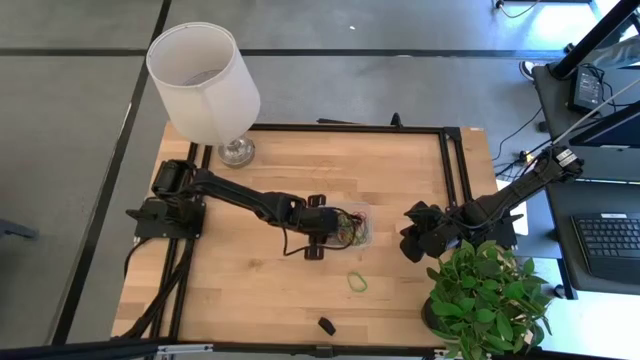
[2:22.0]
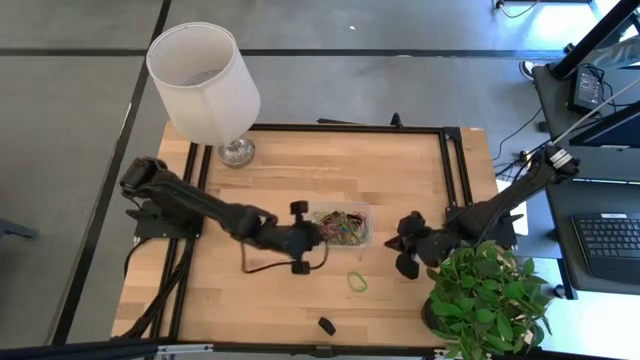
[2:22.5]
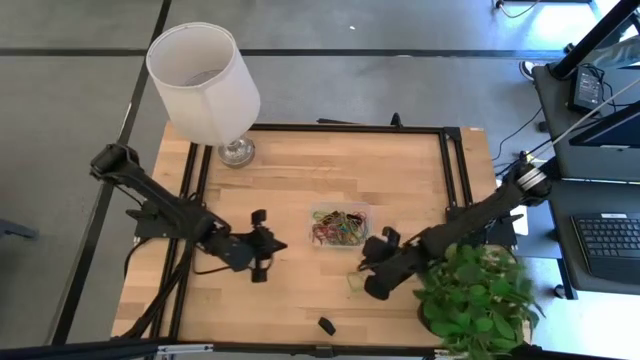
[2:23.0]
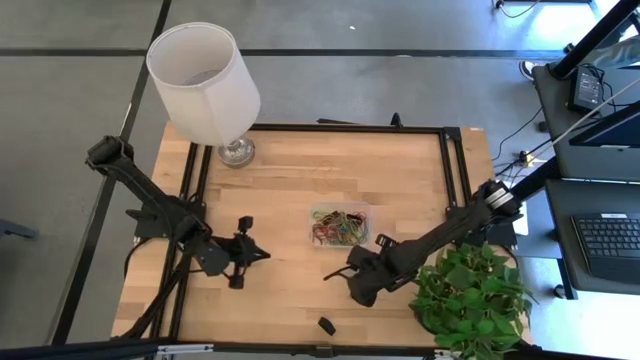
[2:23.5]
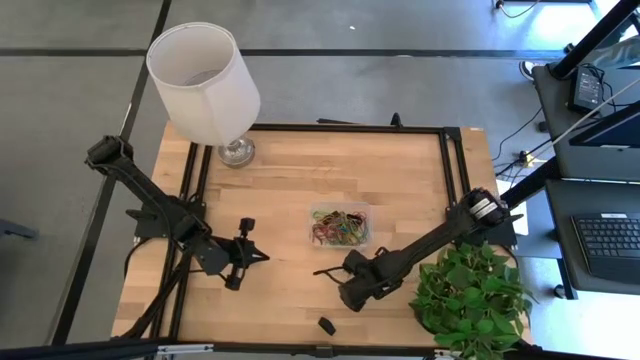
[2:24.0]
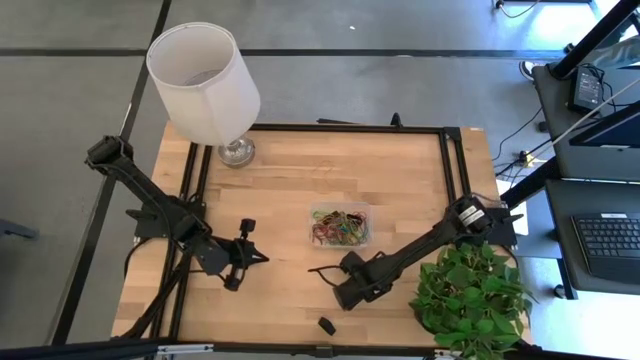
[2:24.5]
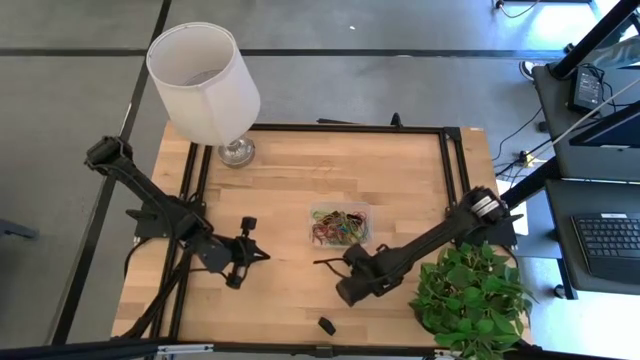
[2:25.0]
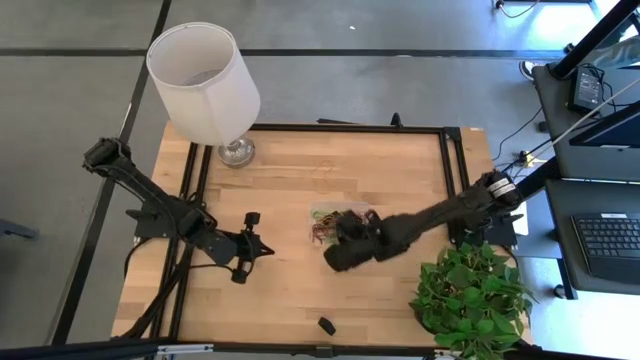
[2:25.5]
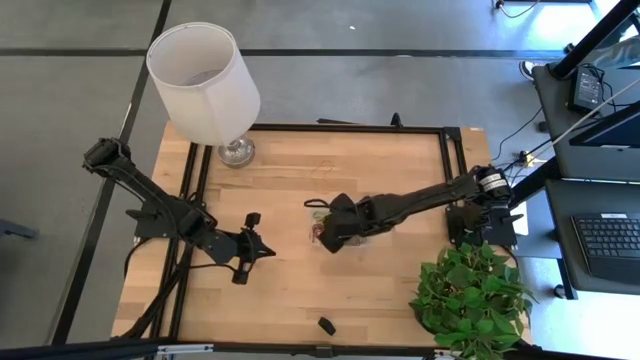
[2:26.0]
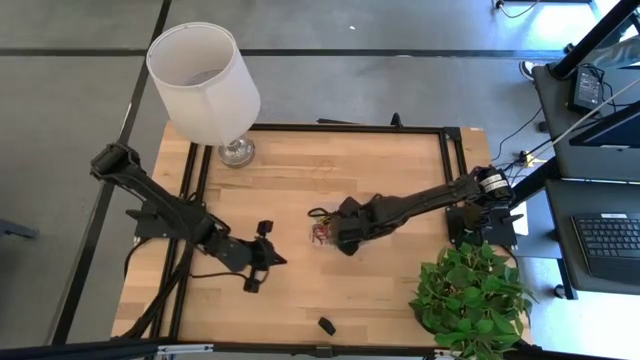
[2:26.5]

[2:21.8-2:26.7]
Task: Pick and place rubber bands into bin
Put the green rubber band into the transparent bin

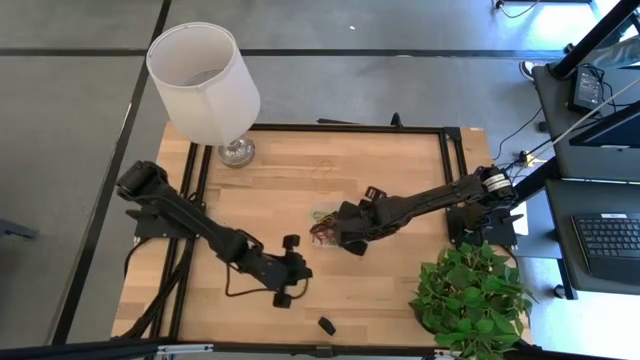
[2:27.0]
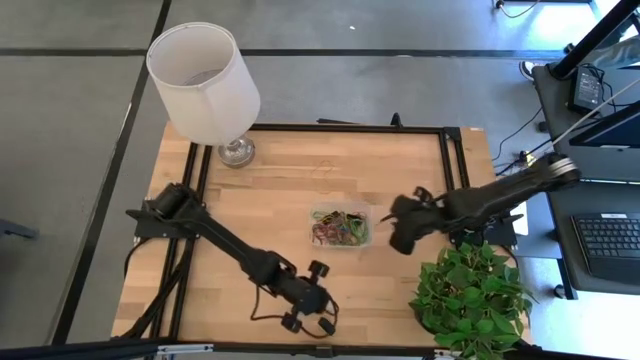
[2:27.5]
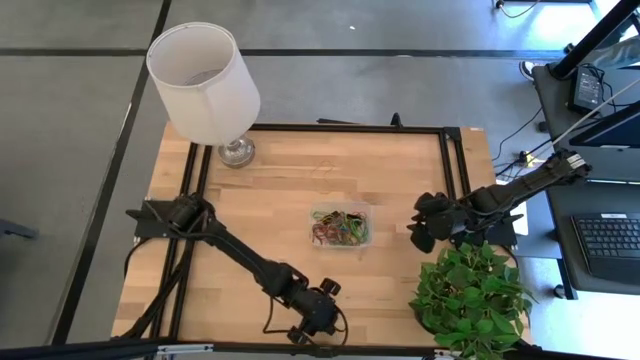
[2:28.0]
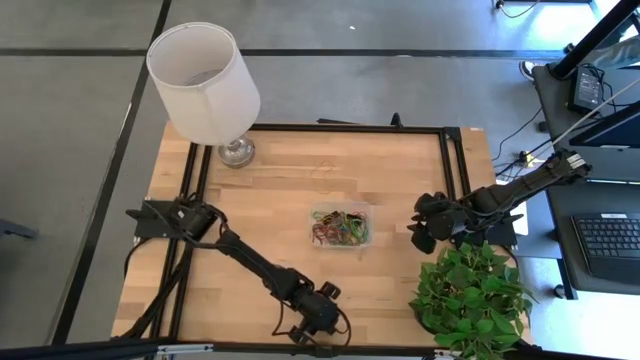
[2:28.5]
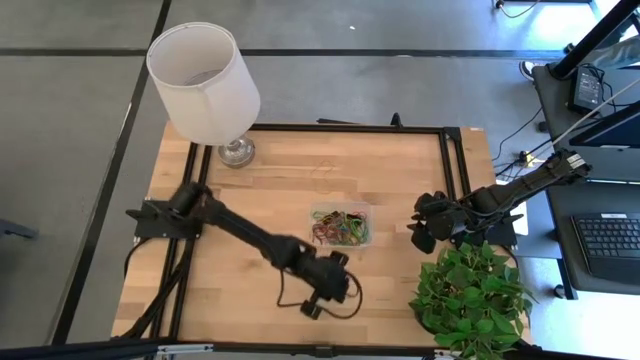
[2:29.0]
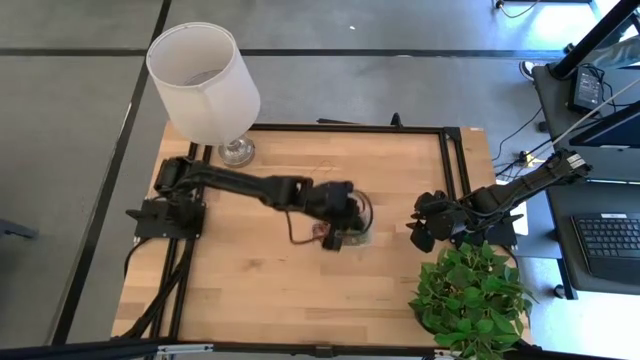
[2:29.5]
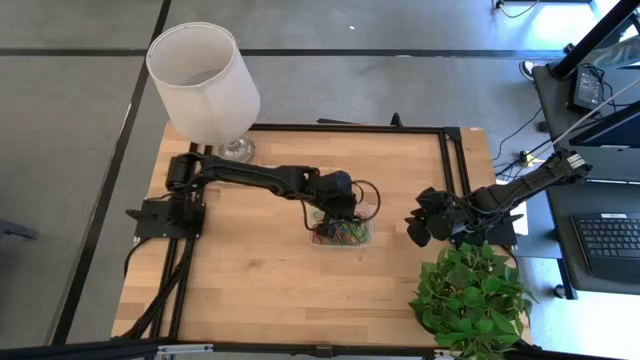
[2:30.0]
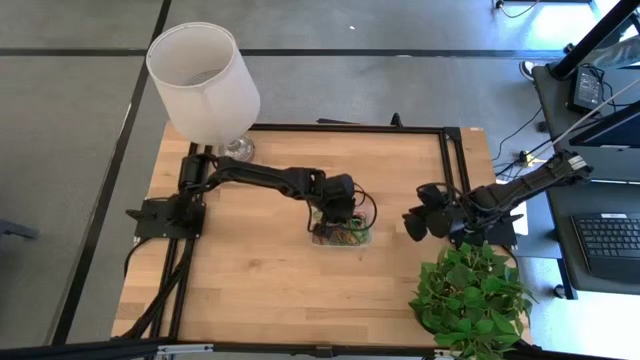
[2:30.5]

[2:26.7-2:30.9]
Put the black rubber band into the transparent bin

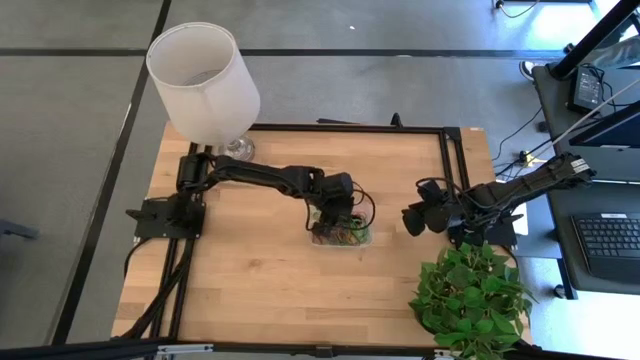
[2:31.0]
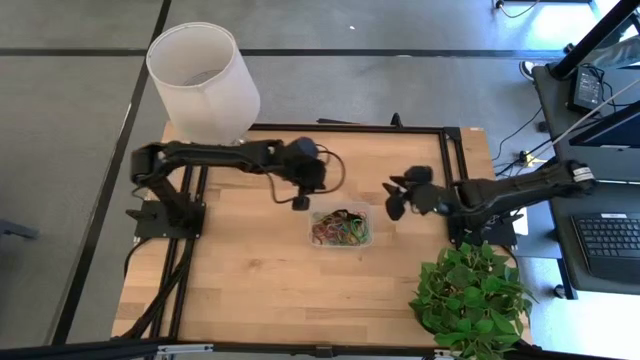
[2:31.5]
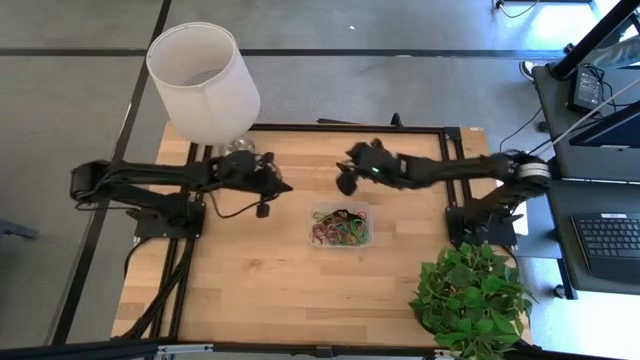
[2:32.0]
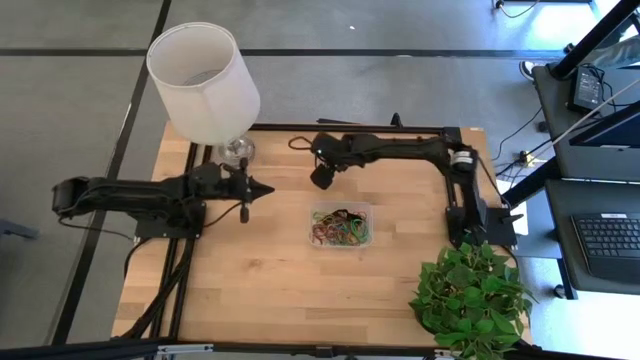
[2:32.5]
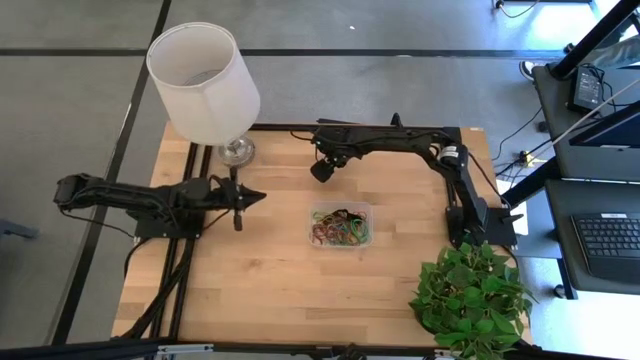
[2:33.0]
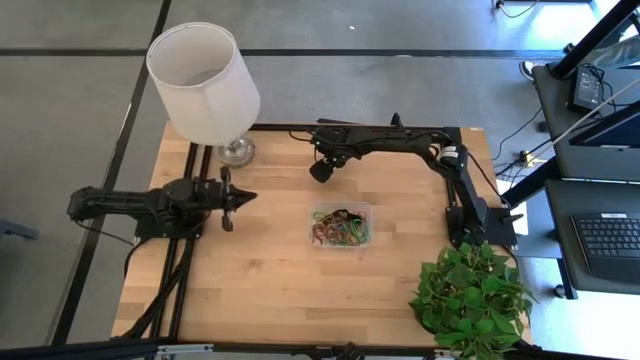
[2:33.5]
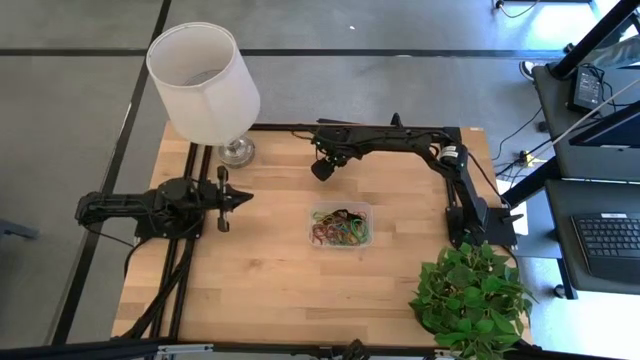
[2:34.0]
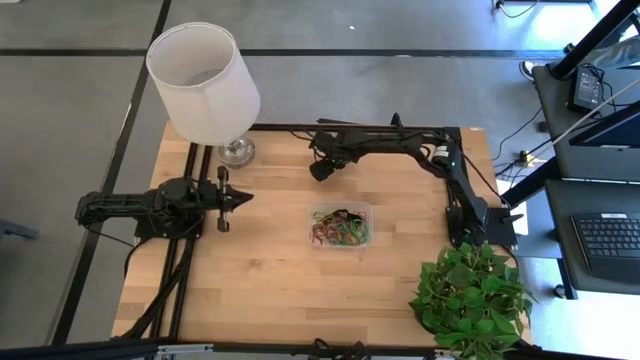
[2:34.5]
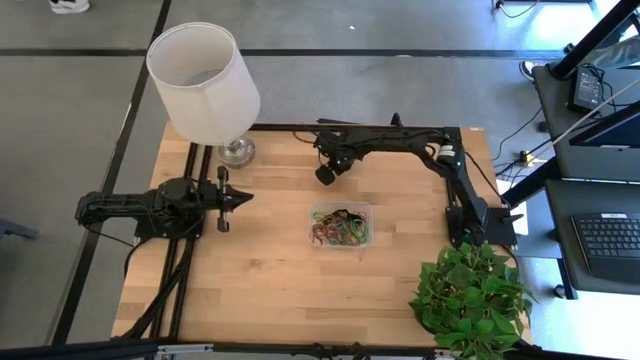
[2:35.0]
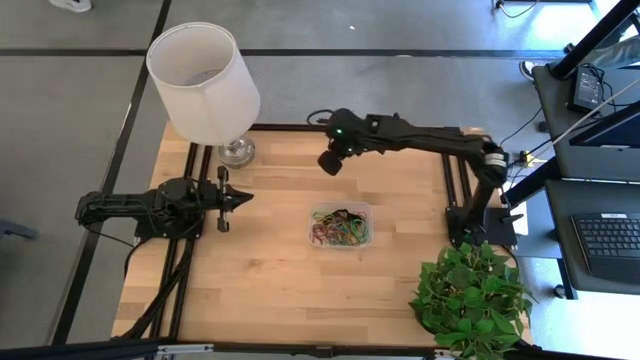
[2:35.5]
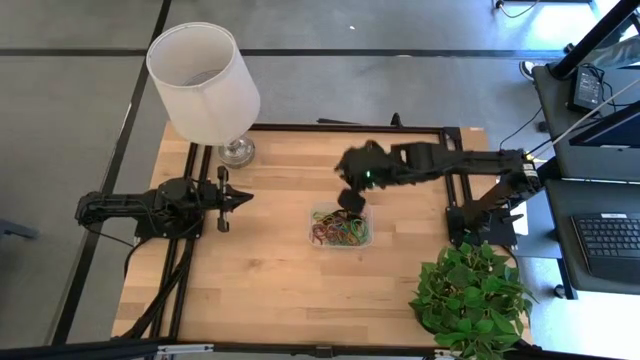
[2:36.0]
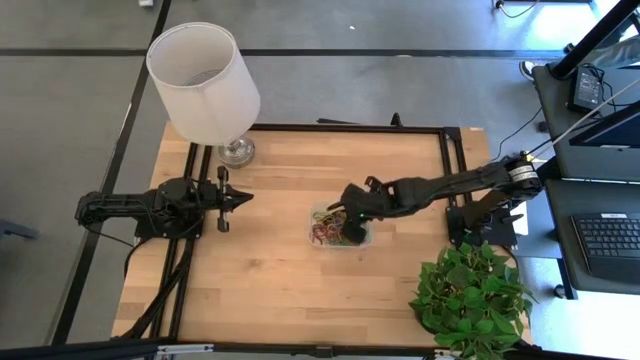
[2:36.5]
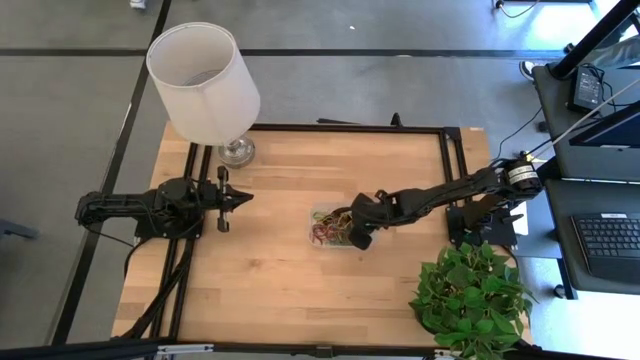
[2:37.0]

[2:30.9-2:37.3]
Put the yellow rubber band into the transparent bin

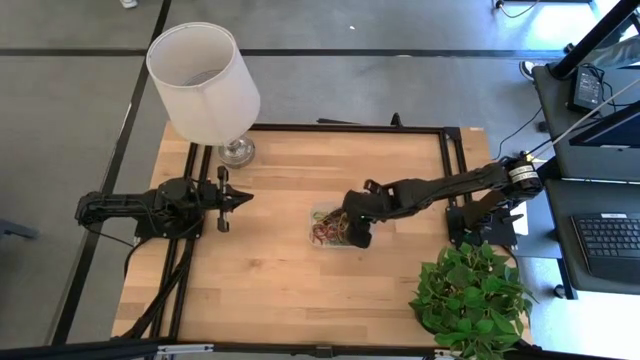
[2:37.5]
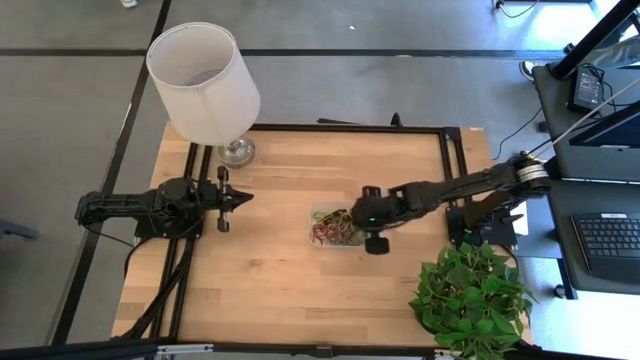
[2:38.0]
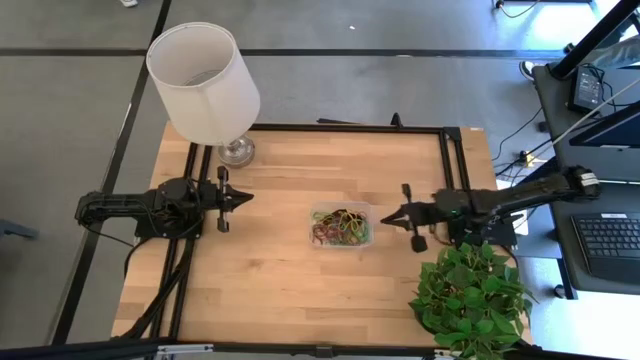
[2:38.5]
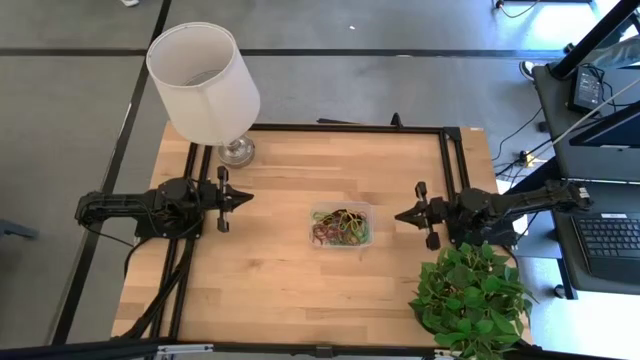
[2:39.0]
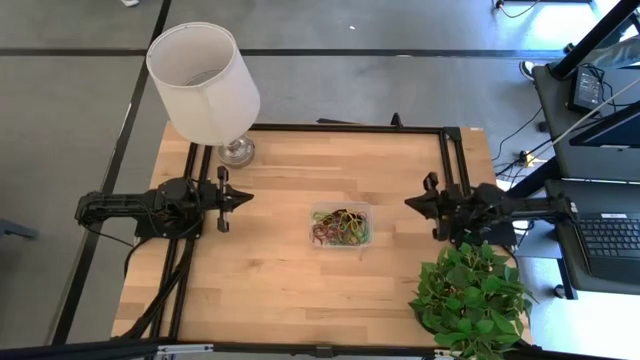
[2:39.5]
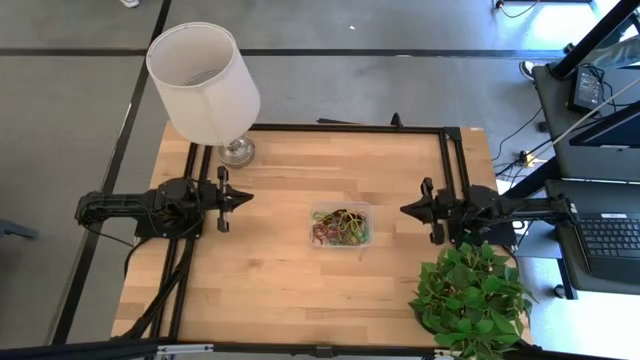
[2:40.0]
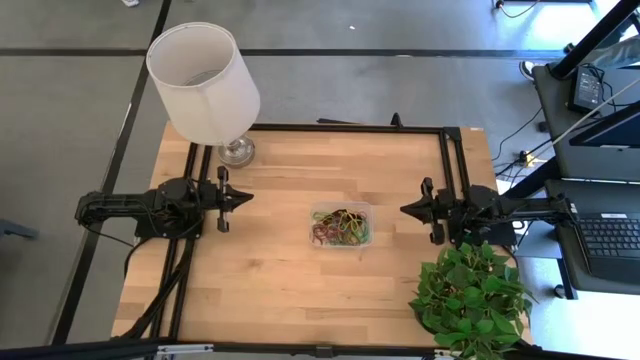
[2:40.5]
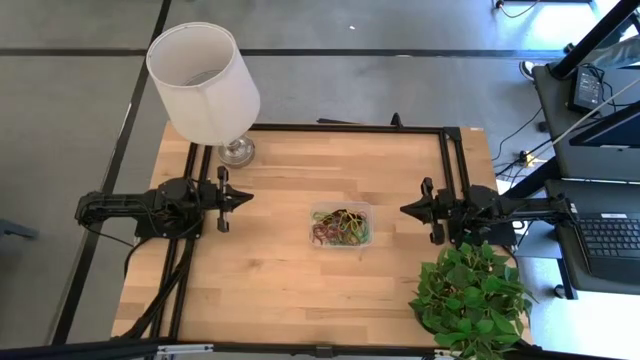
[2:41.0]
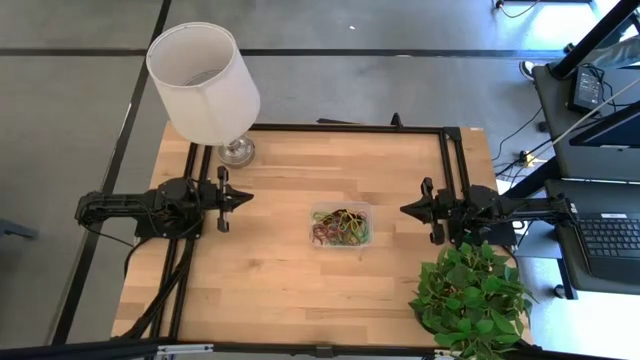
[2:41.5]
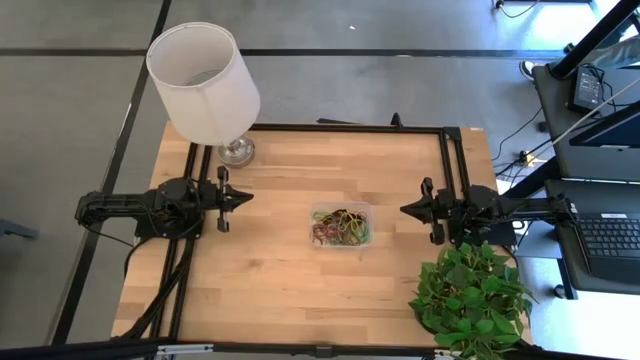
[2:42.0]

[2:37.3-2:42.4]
Return to Home Position
